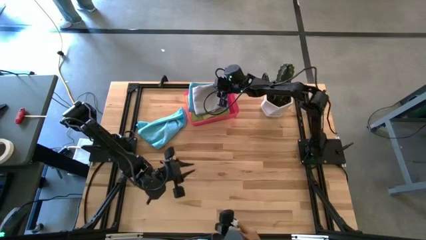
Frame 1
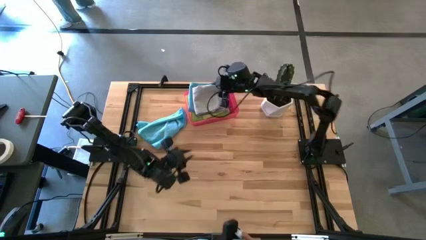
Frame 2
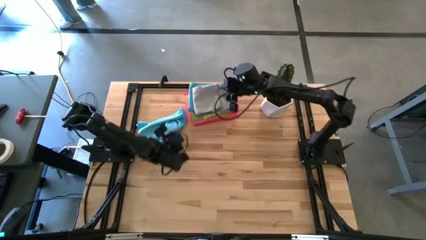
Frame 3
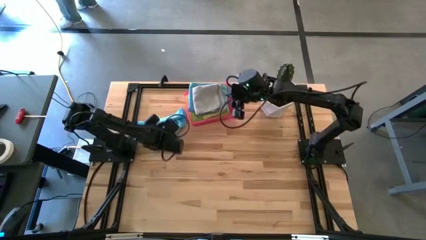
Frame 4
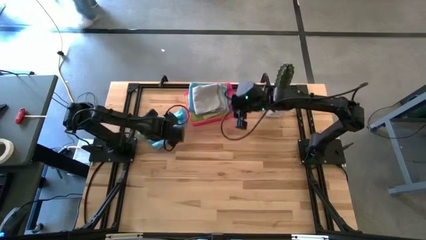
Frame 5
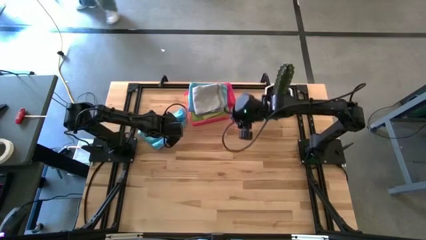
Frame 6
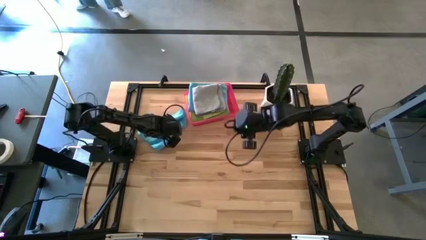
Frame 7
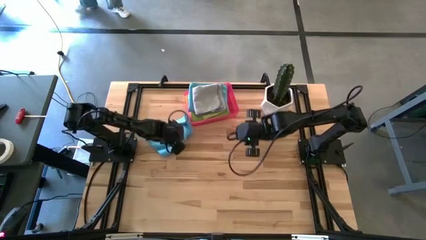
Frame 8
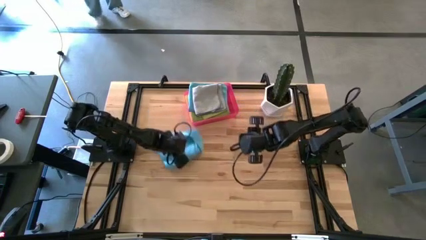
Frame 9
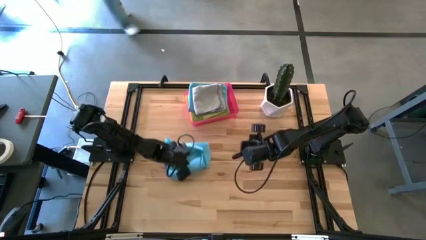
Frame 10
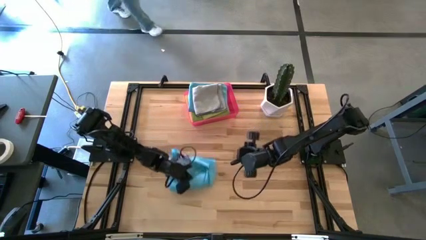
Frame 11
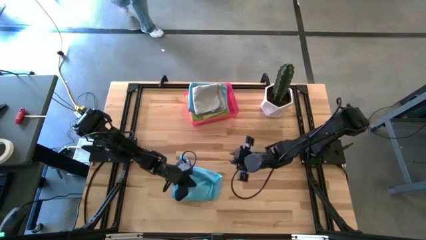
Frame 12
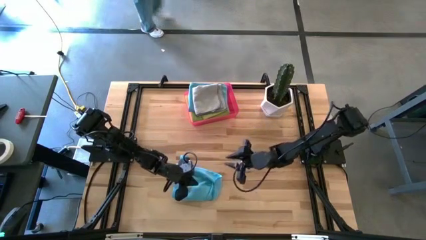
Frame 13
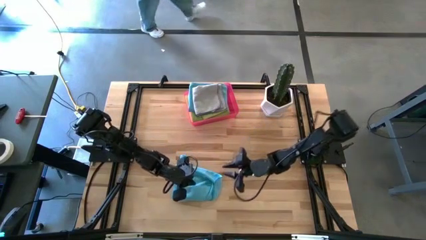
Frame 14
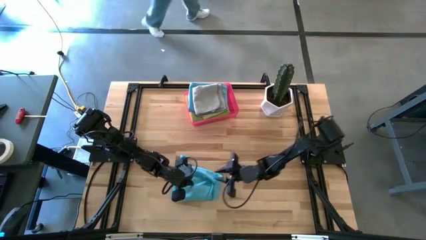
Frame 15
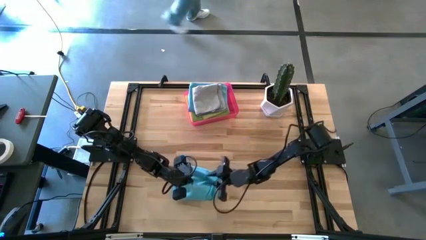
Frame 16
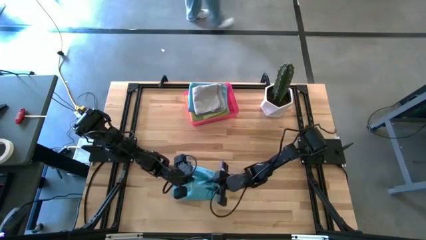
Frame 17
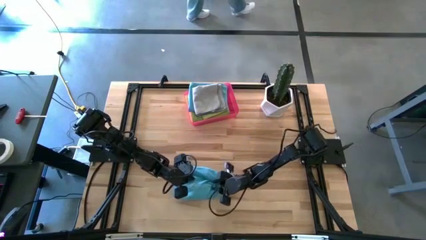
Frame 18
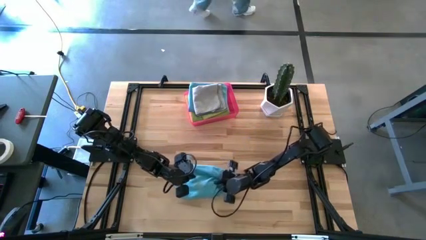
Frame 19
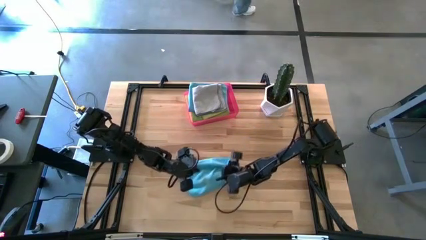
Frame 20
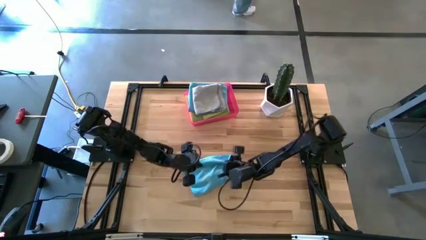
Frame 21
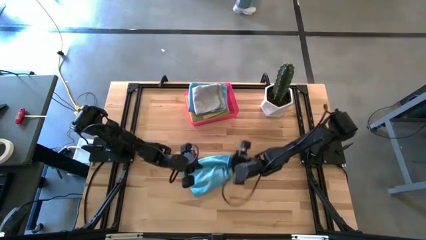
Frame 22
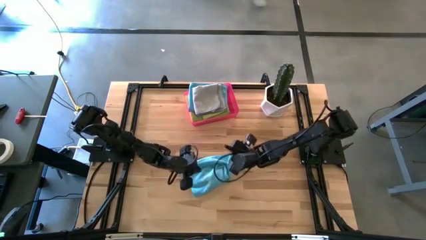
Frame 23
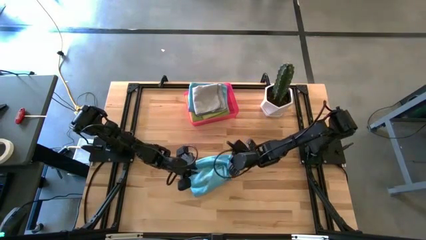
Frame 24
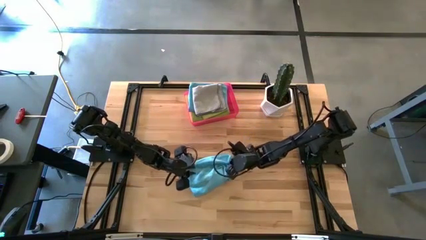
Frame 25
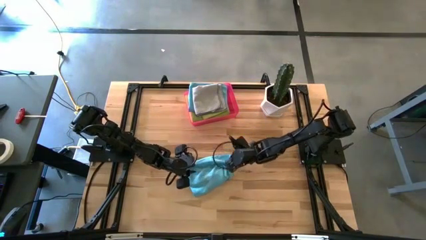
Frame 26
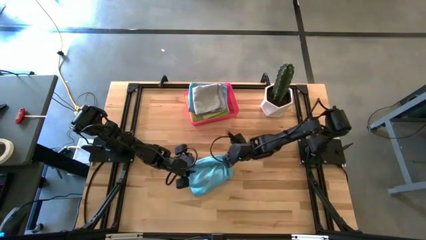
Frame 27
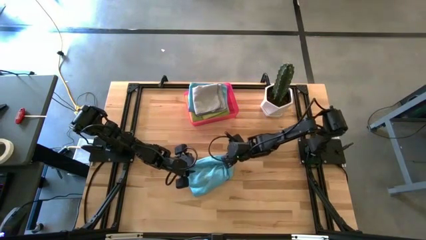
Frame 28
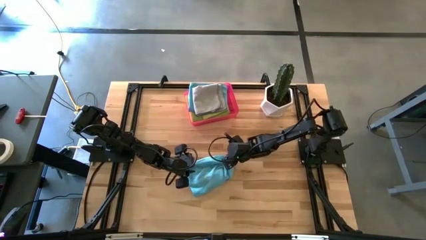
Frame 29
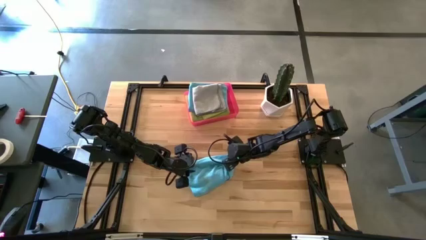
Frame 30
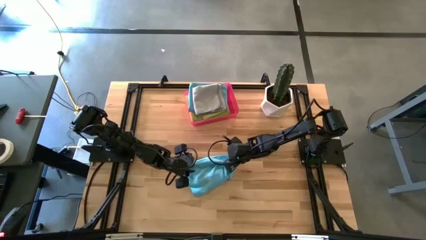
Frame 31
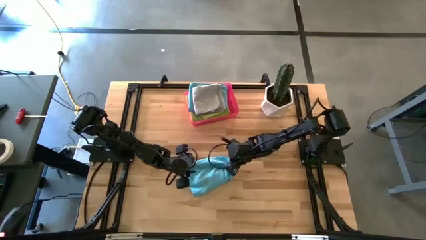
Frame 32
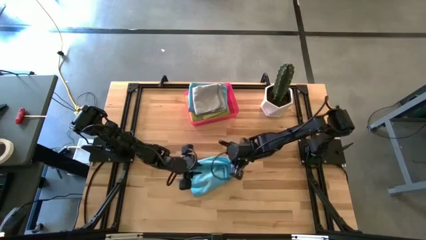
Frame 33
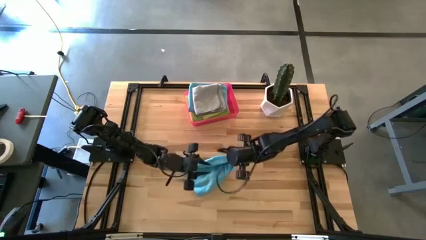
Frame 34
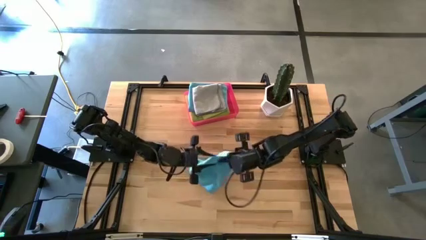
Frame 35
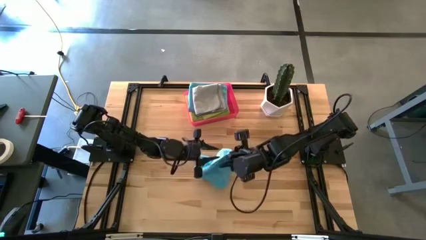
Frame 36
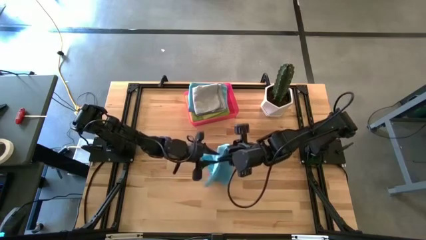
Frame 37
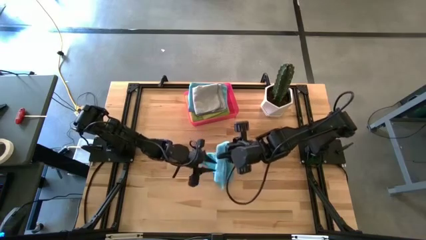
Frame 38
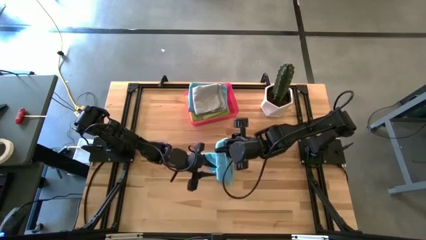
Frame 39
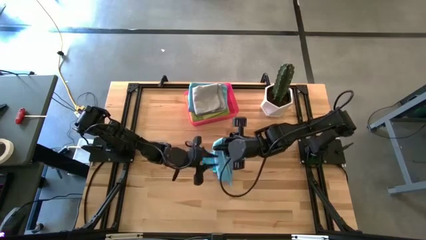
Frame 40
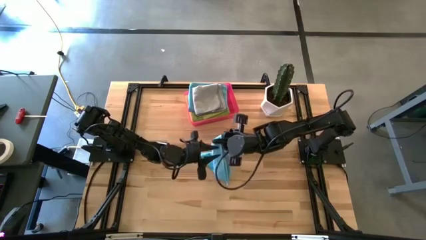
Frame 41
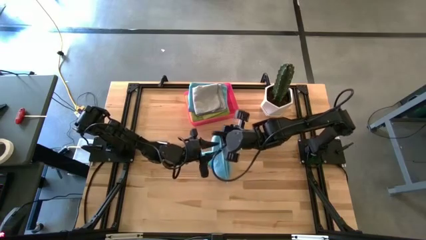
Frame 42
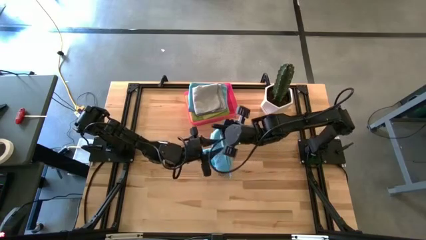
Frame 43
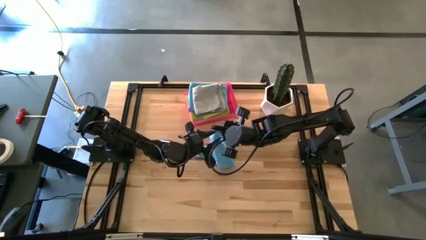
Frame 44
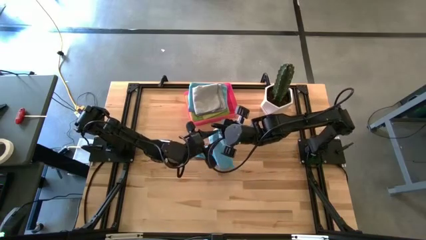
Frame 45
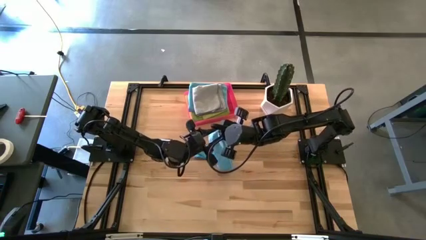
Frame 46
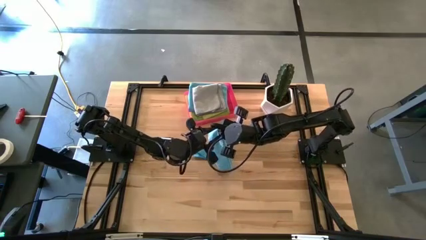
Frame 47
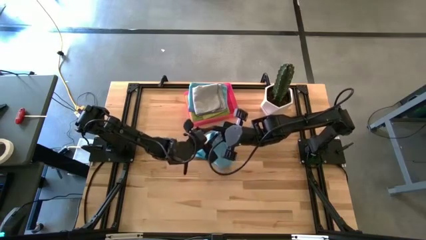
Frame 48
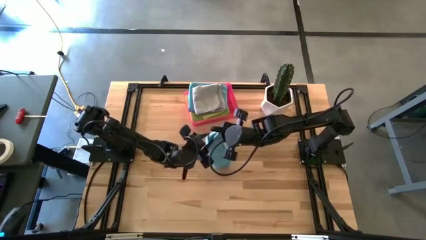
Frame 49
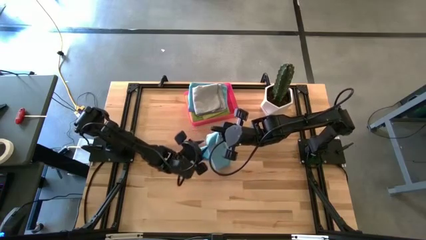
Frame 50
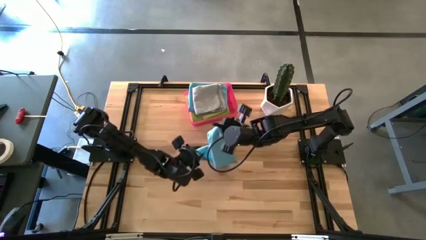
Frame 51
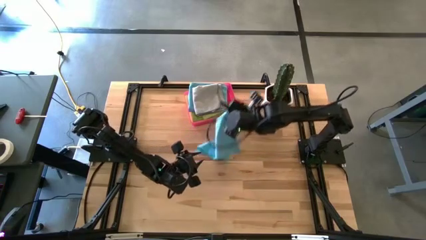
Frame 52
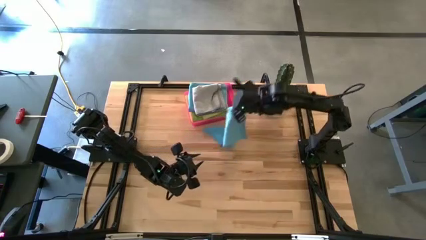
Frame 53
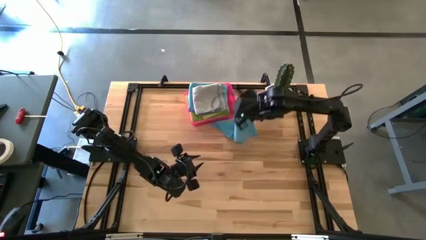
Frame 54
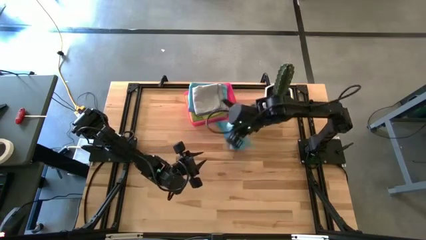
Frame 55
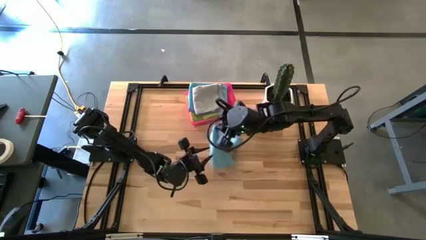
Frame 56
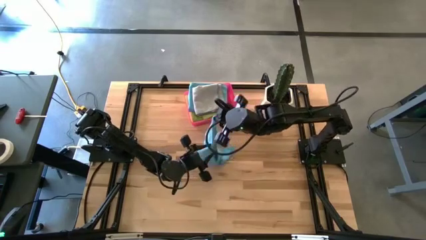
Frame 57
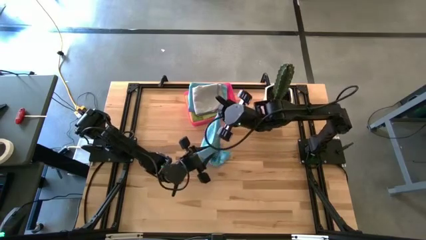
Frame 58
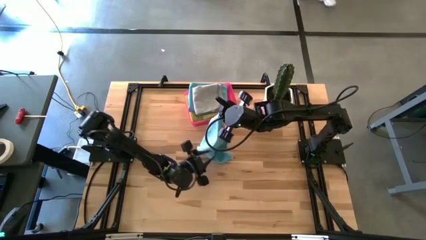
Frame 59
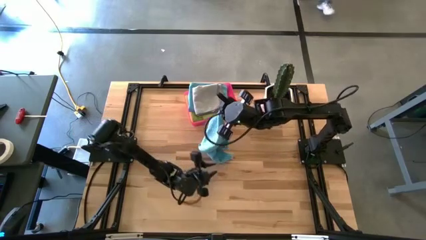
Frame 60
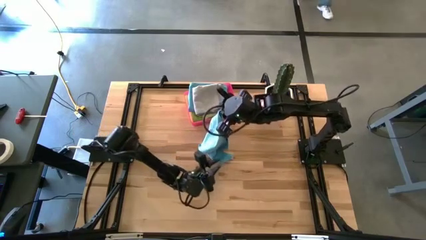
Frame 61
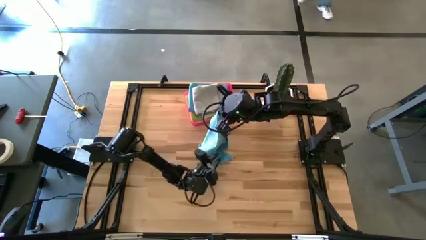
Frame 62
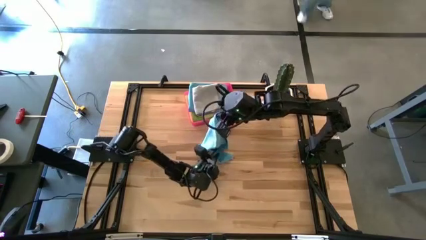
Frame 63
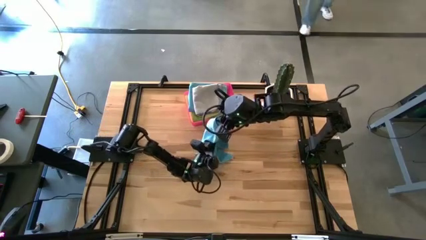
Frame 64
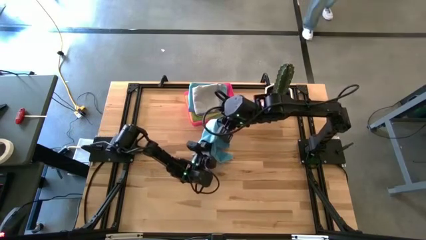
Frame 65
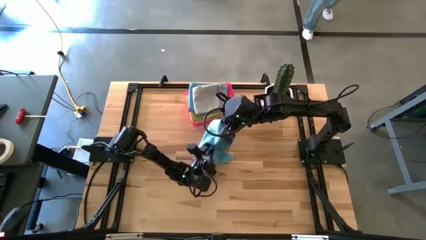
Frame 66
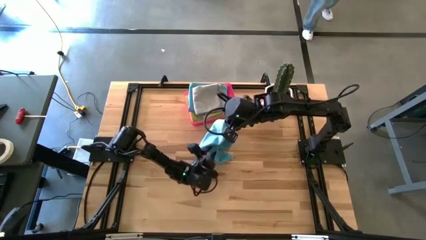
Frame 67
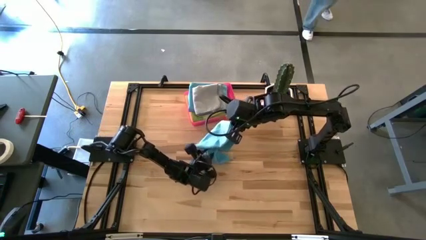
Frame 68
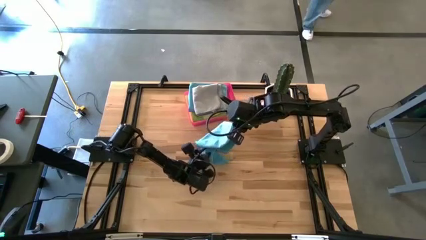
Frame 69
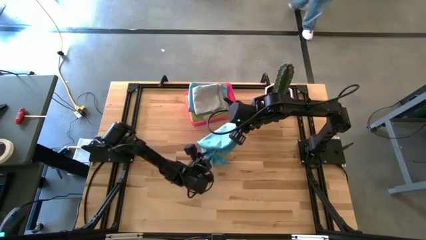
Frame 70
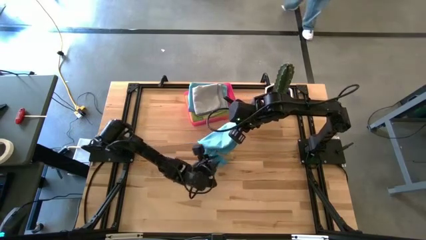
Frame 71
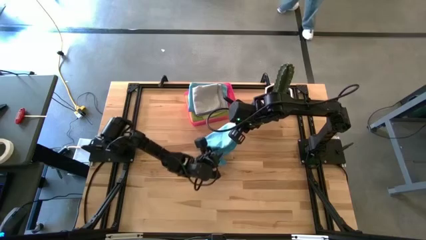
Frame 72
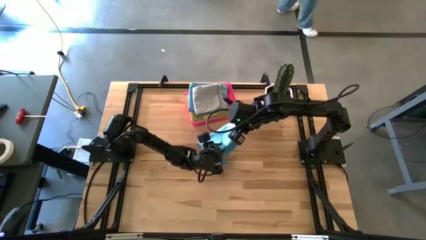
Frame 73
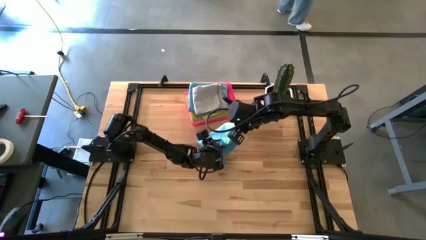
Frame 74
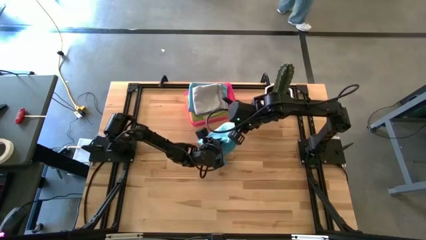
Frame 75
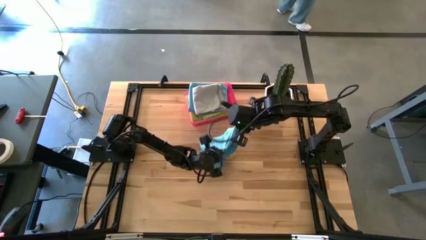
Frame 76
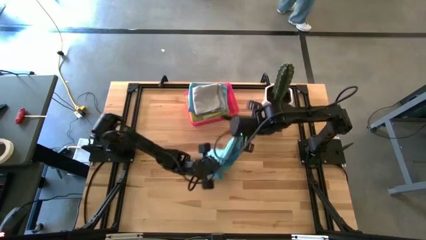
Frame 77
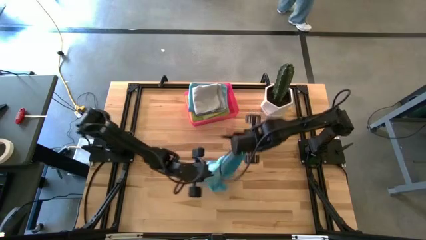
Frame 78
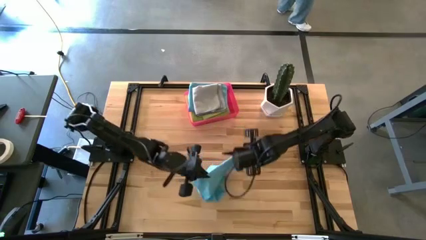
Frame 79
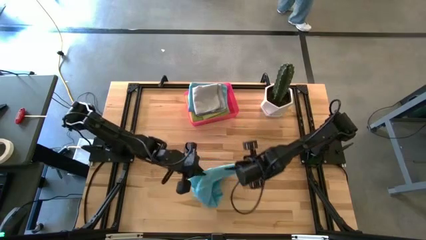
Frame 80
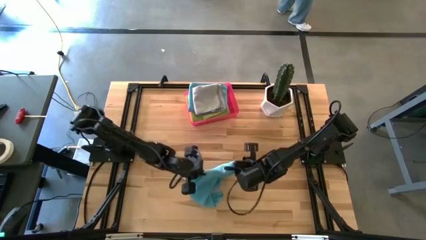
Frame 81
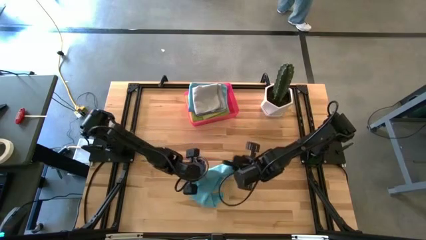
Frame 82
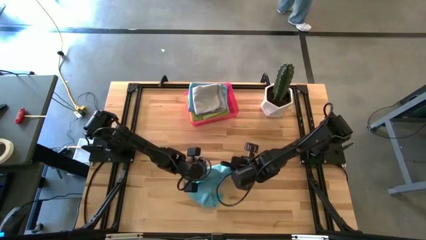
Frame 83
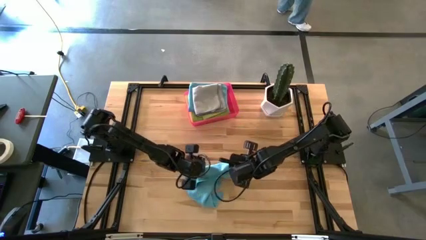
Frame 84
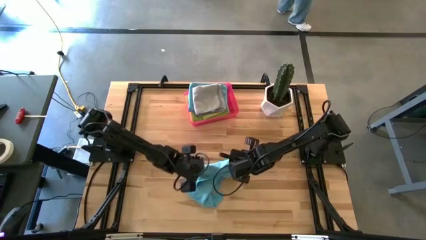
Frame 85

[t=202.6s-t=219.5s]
Task: Fold microfiber towels
Fold the blue microfiber cloth
